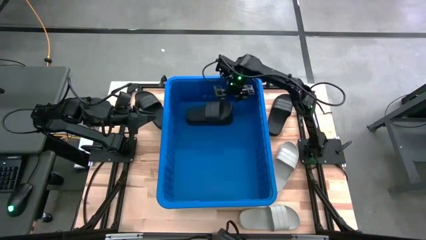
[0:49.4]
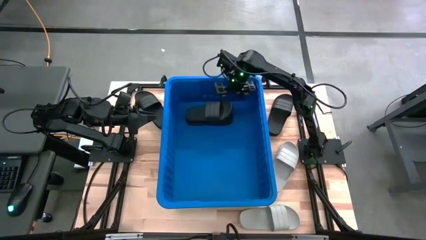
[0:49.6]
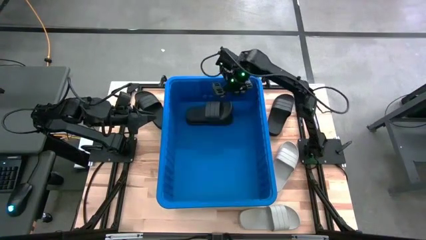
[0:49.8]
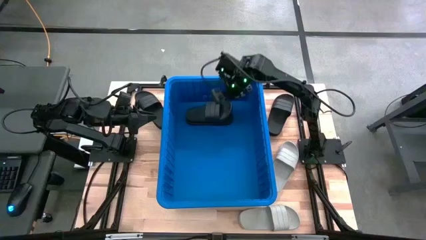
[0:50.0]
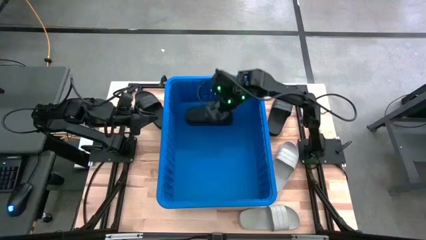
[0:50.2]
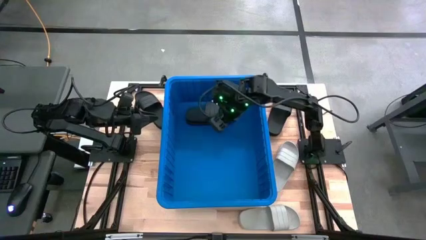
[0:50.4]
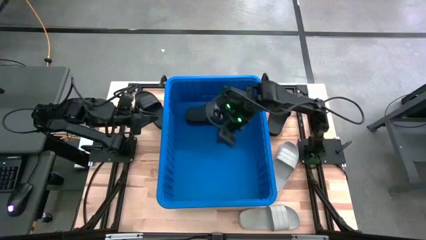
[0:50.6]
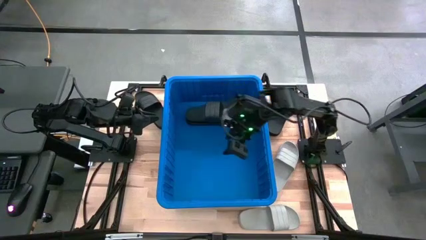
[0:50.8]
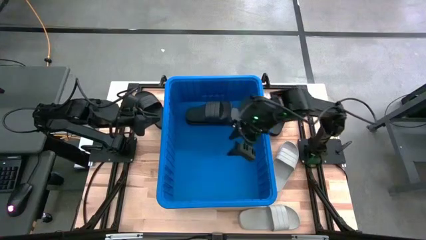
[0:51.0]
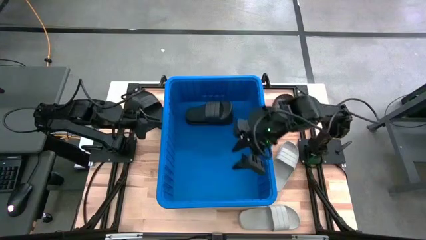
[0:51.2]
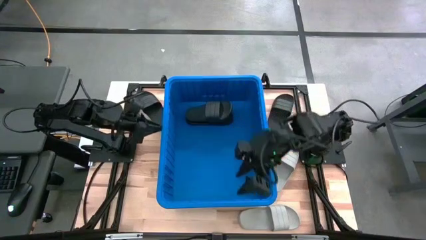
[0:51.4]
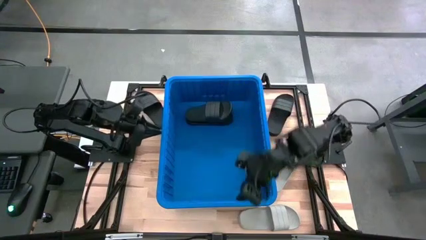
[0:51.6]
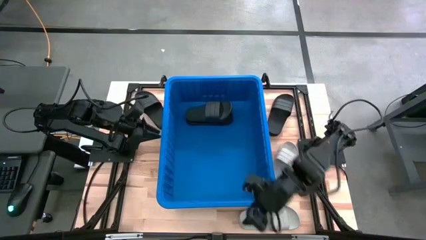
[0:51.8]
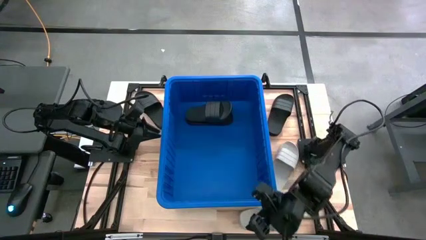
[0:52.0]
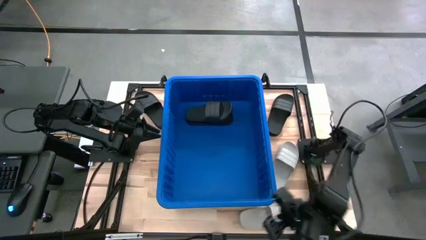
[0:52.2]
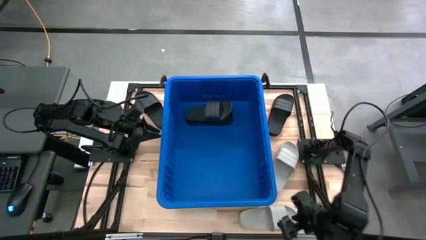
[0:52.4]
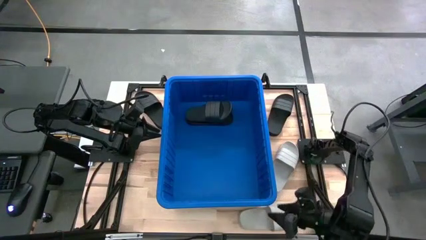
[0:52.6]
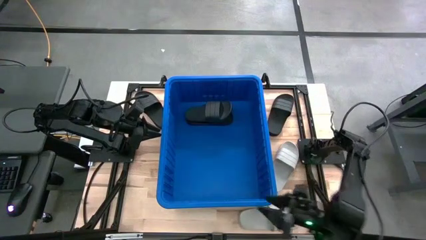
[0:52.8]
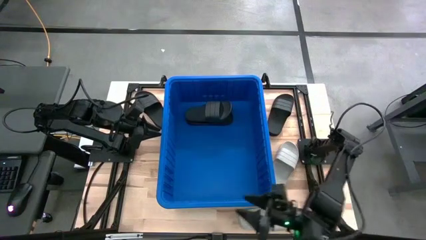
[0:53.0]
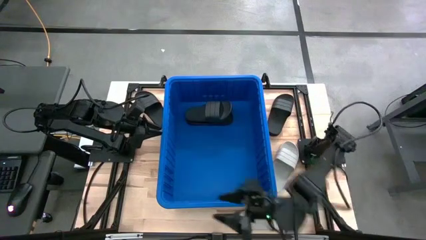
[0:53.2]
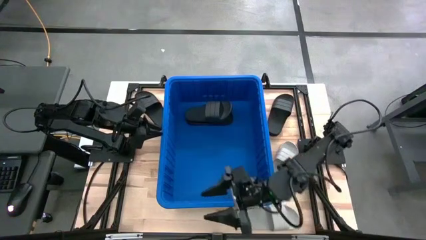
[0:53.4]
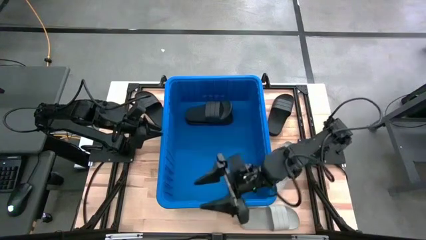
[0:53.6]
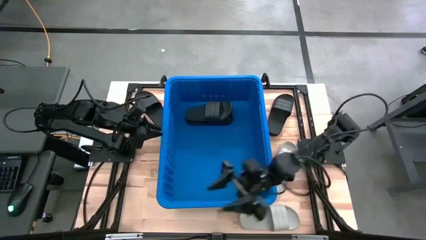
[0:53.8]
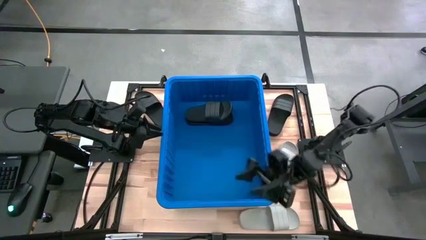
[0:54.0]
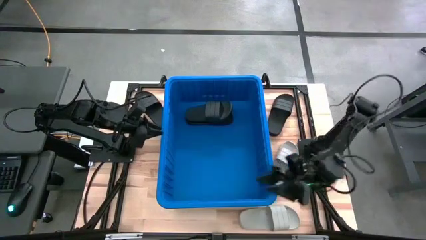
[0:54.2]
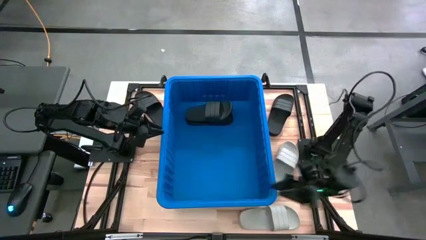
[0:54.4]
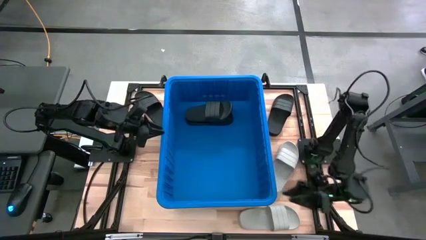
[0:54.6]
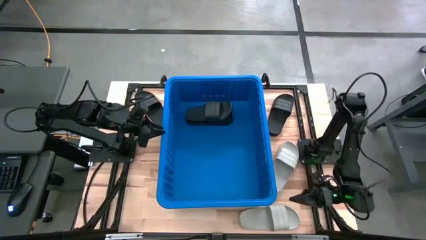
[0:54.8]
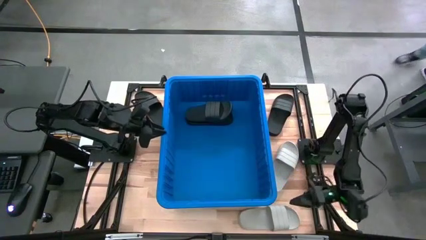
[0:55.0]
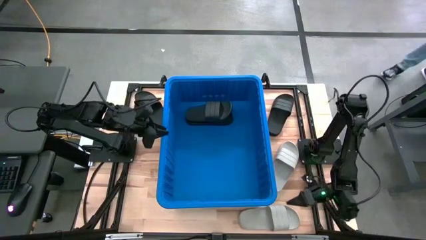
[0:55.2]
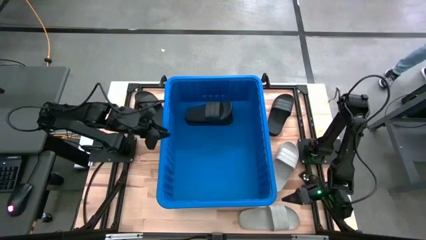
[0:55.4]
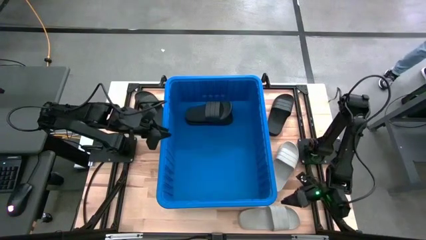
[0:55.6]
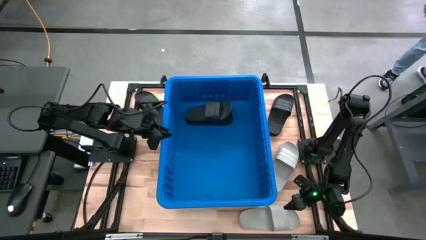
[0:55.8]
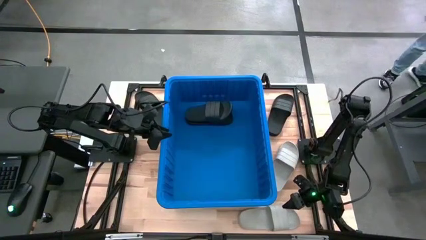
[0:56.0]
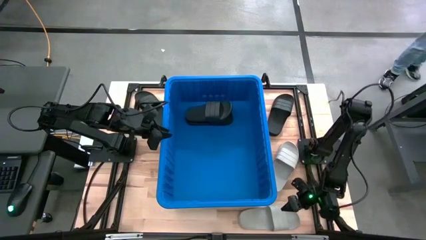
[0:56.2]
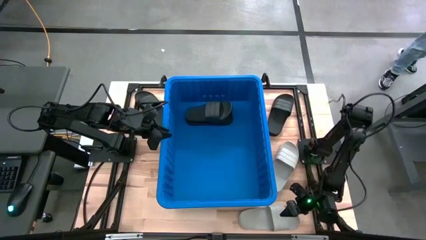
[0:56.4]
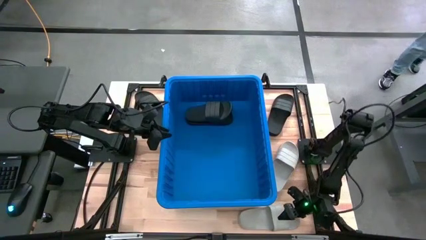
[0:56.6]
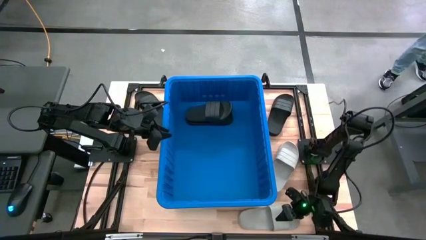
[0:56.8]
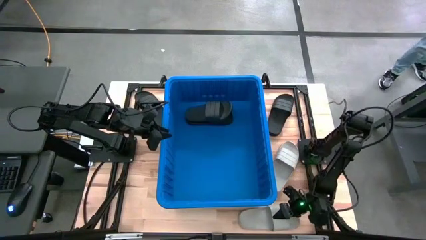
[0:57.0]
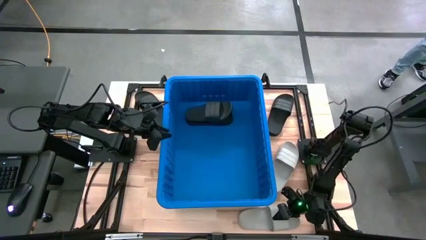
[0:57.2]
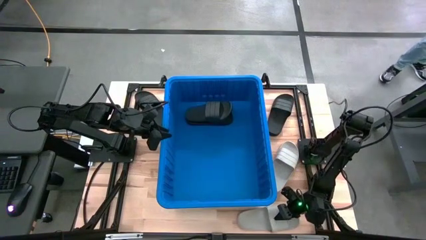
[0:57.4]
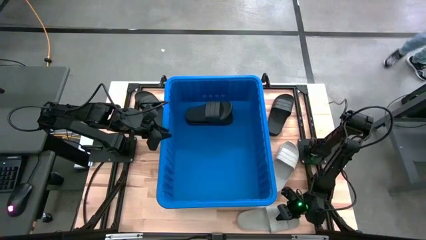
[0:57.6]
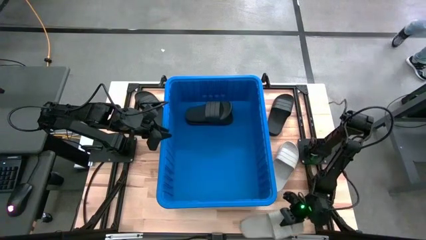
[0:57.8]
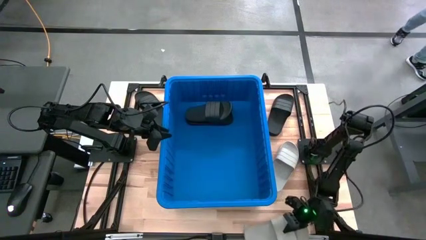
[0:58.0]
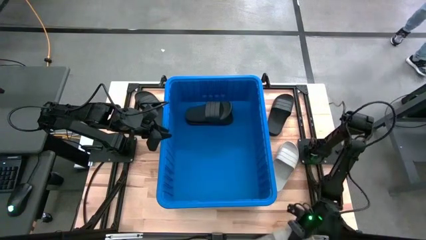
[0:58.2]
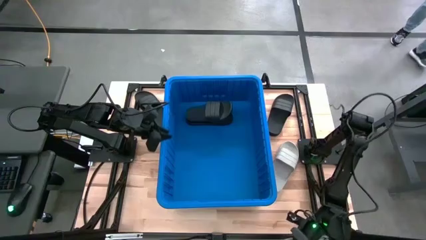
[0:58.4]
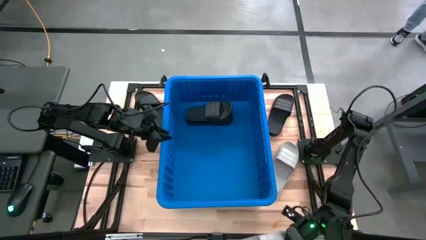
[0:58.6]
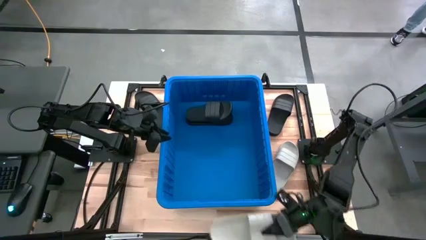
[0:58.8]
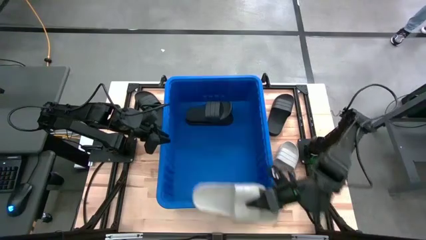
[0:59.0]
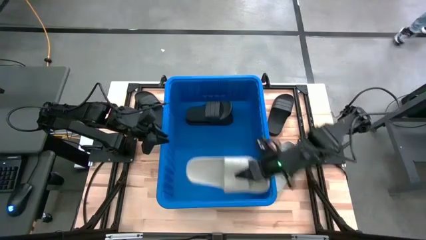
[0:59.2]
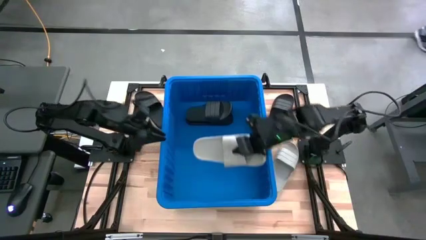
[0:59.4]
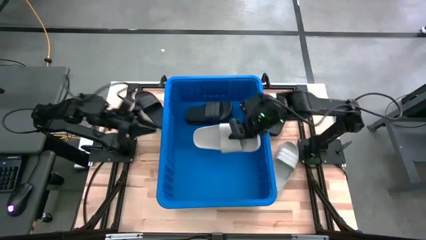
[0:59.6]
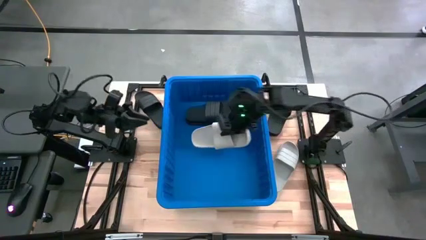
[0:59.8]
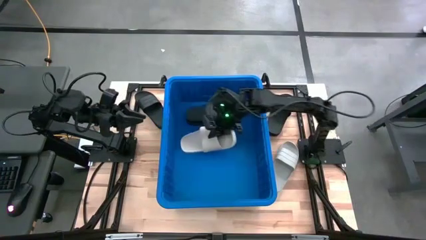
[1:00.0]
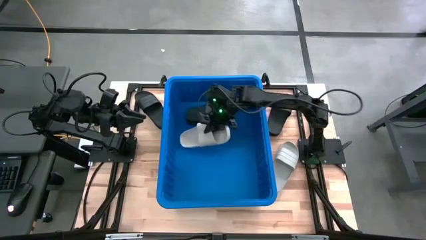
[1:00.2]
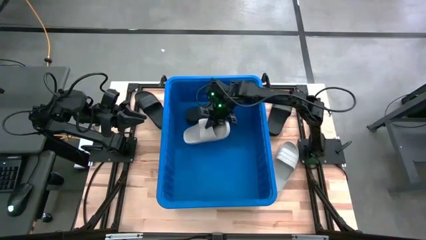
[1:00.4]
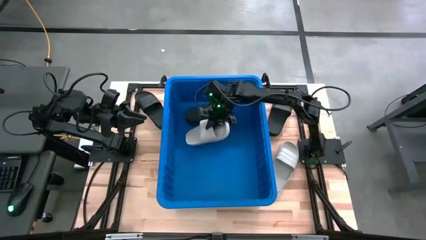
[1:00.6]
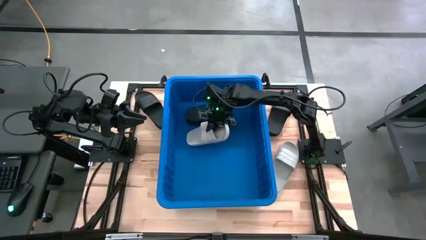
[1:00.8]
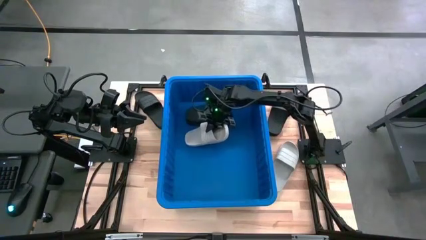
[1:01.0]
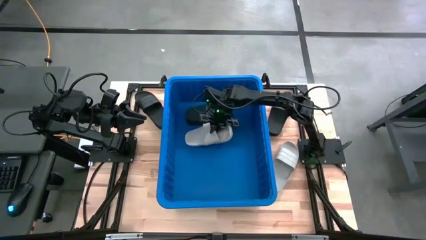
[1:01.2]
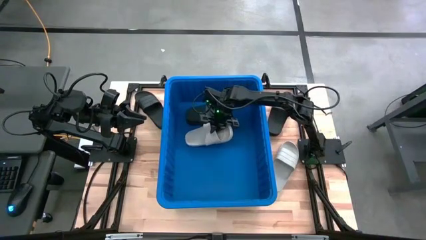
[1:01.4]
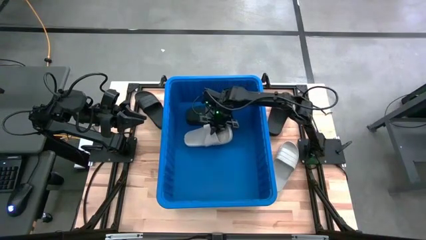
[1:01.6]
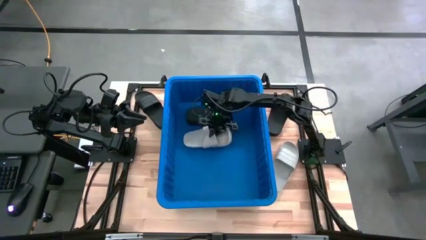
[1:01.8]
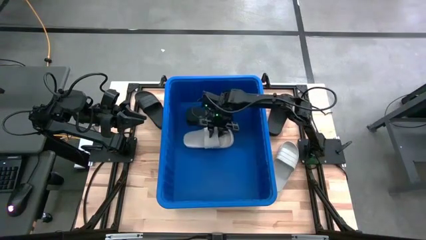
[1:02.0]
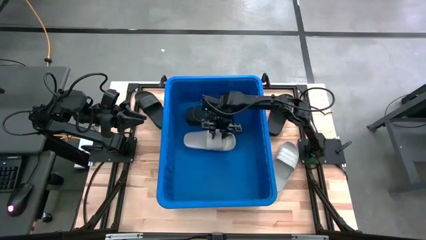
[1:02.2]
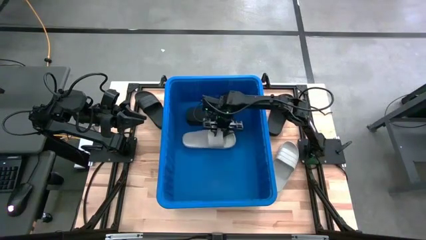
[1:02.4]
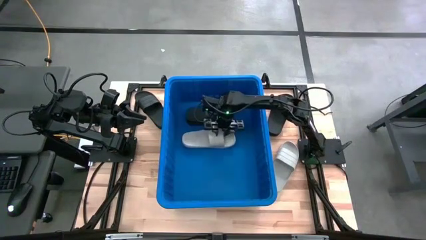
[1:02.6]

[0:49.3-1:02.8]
Task: Pick and place slides into bin
Put the bottom gray slide into the blue bin

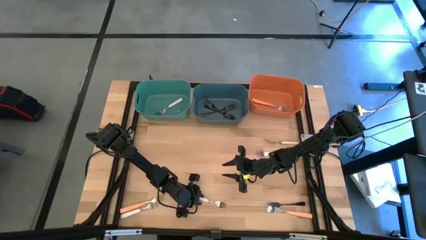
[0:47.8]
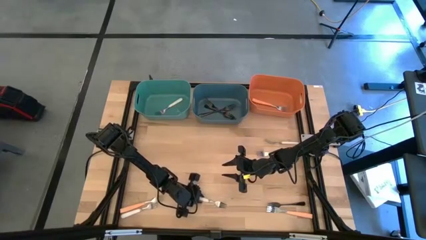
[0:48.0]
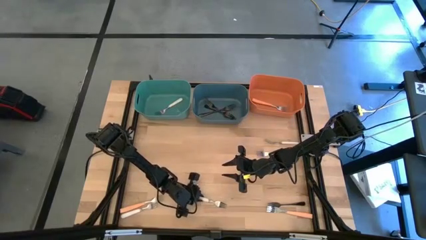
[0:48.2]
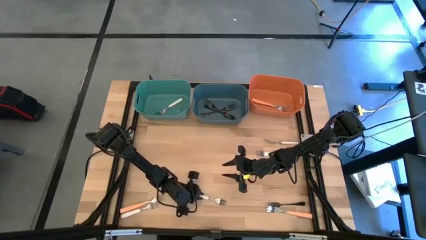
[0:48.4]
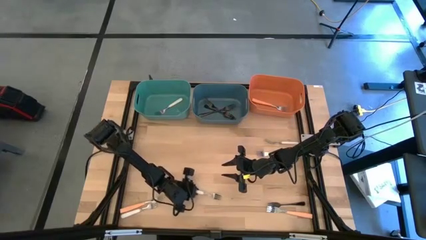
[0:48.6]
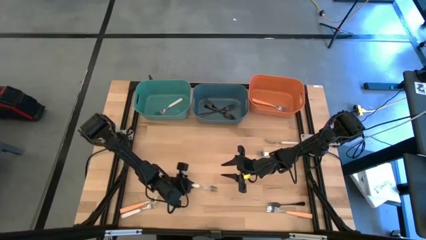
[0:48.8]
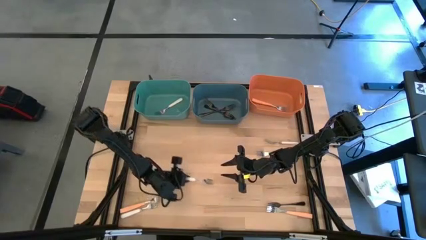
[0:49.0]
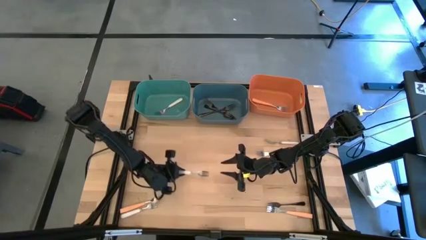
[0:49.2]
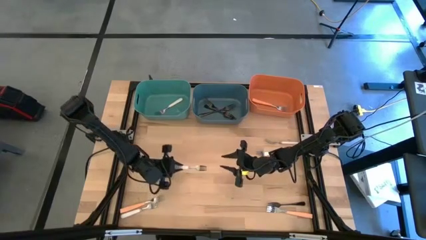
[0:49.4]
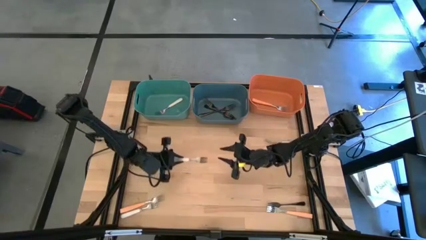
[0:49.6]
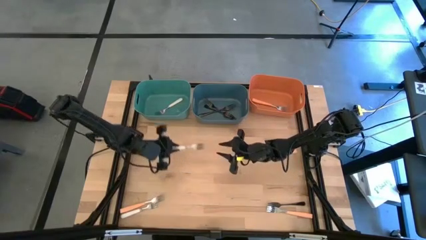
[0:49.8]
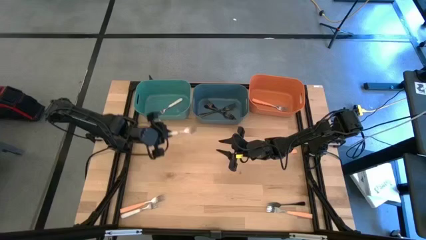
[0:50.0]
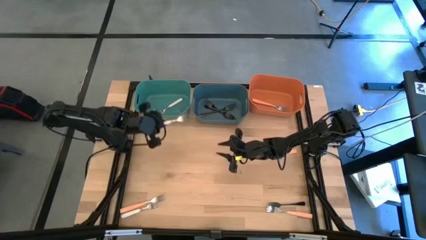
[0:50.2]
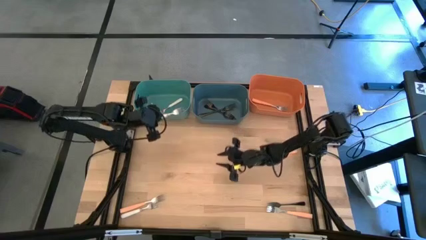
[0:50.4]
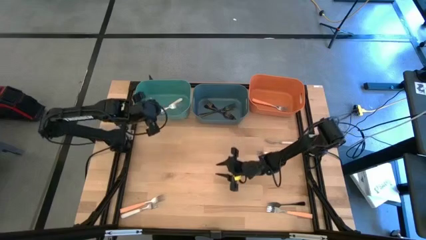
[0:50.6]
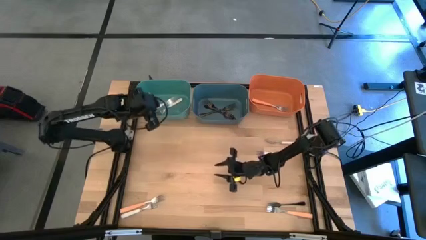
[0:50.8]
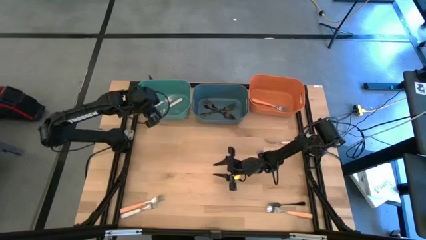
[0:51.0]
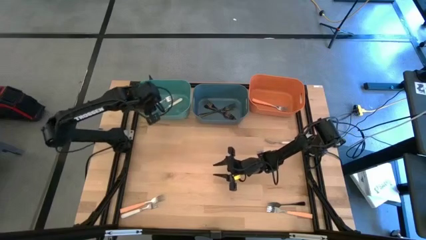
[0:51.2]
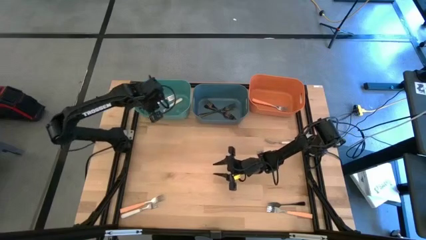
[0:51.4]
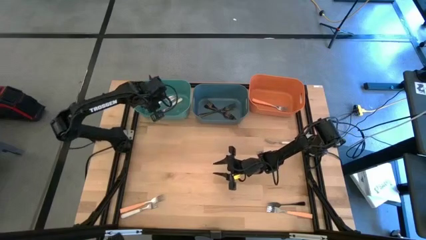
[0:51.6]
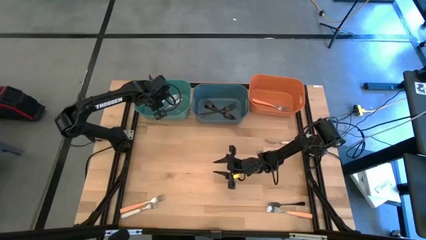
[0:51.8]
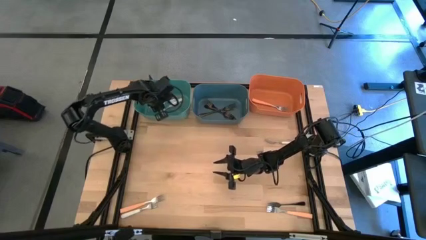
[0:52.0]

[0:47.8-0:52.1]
Task: Sort silverware by color (type)
Put the bottom right white fork into the green bin
